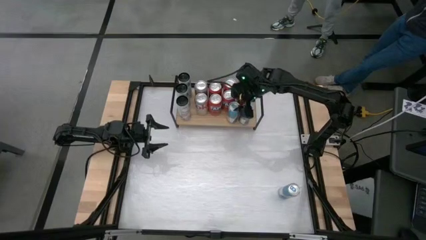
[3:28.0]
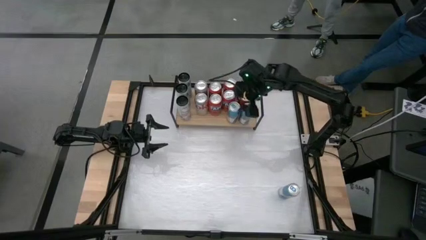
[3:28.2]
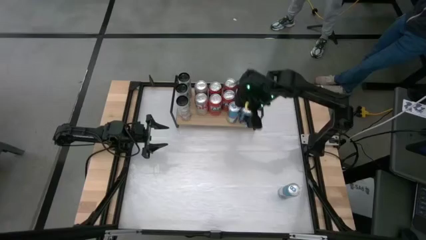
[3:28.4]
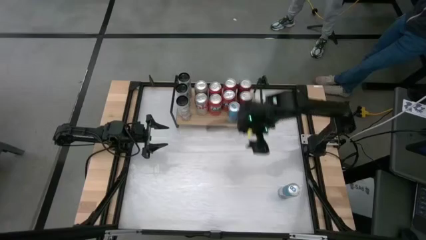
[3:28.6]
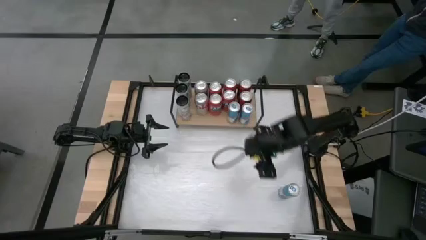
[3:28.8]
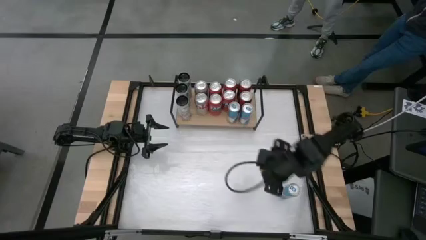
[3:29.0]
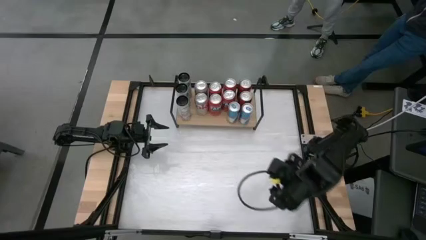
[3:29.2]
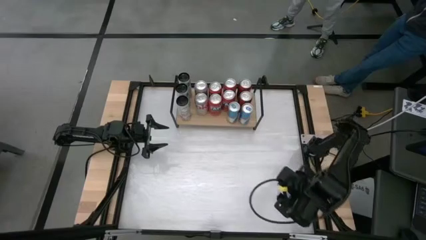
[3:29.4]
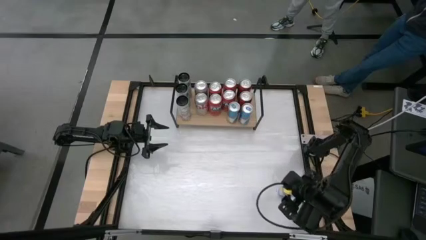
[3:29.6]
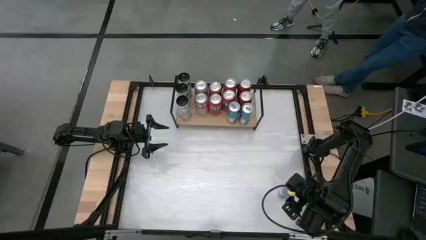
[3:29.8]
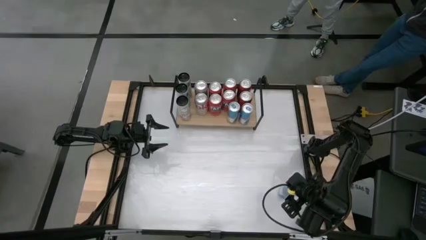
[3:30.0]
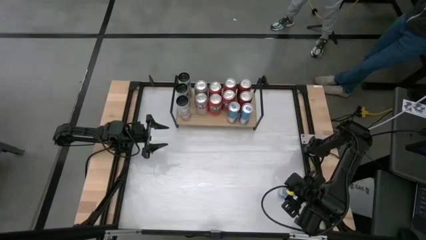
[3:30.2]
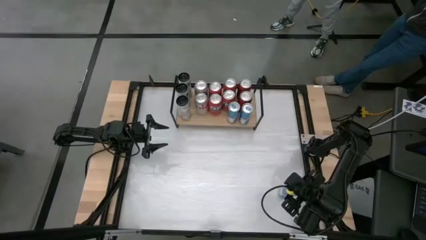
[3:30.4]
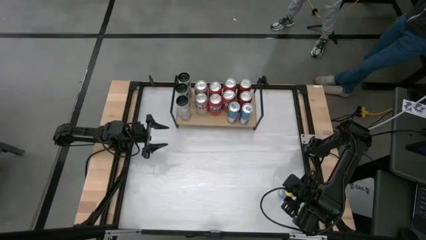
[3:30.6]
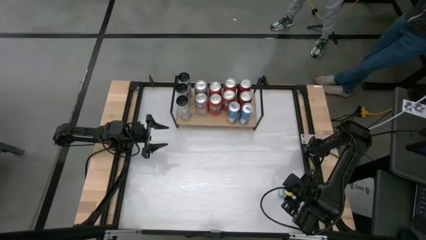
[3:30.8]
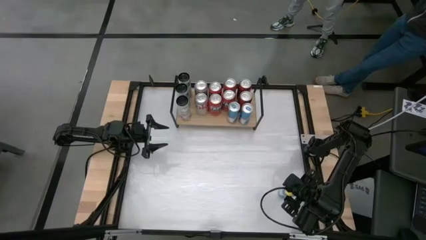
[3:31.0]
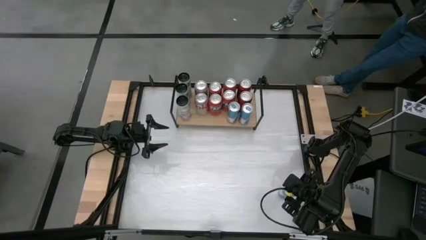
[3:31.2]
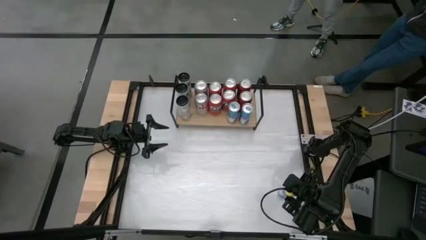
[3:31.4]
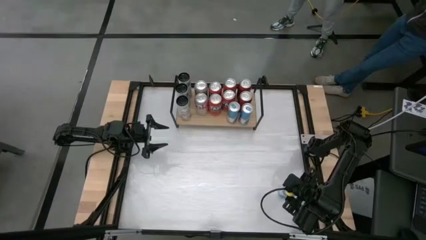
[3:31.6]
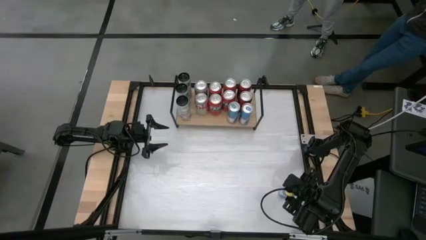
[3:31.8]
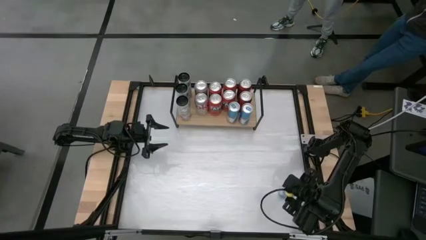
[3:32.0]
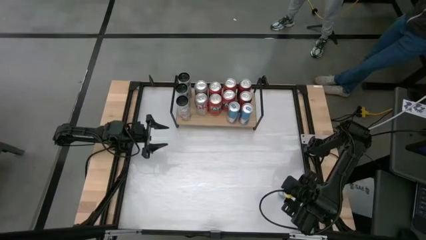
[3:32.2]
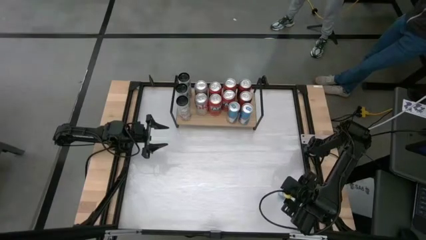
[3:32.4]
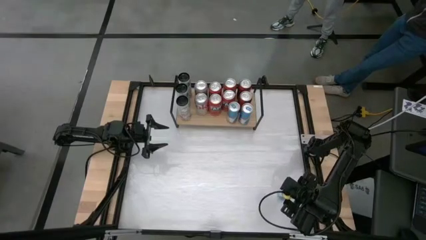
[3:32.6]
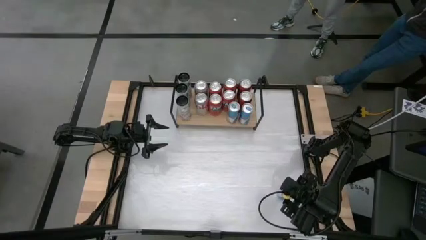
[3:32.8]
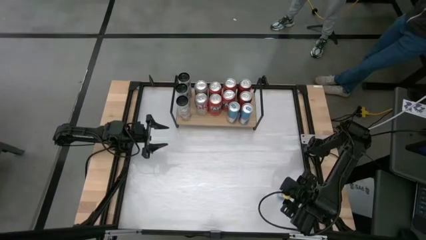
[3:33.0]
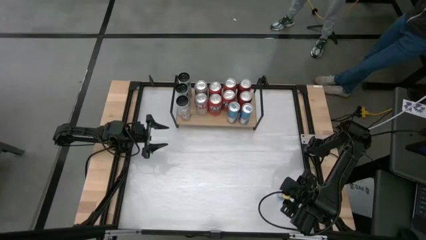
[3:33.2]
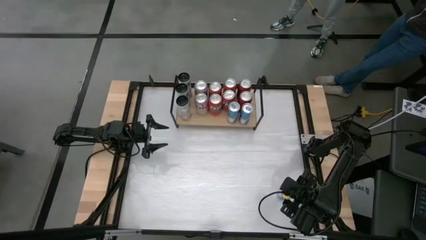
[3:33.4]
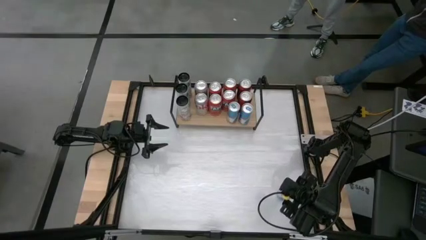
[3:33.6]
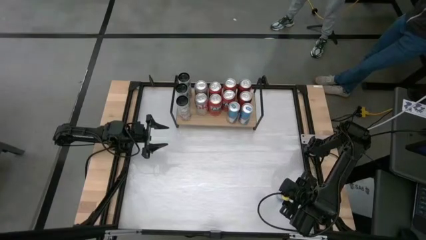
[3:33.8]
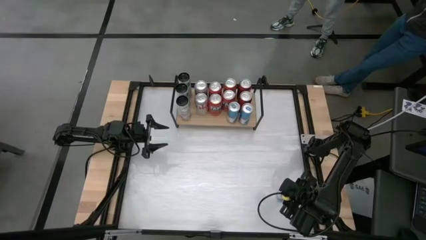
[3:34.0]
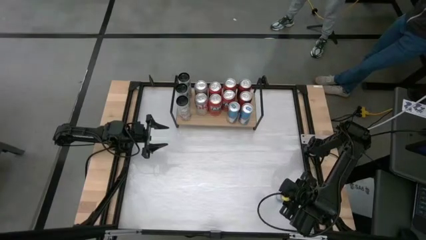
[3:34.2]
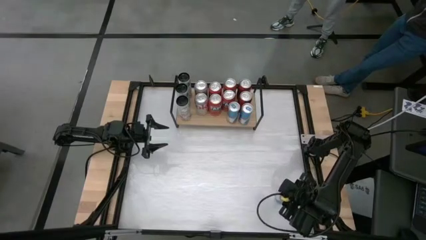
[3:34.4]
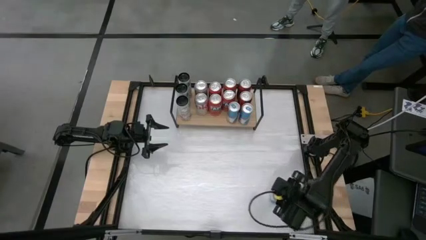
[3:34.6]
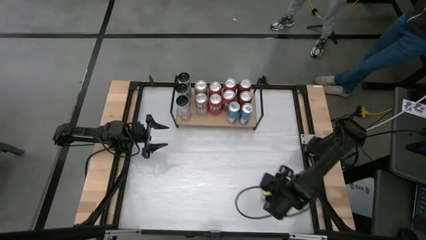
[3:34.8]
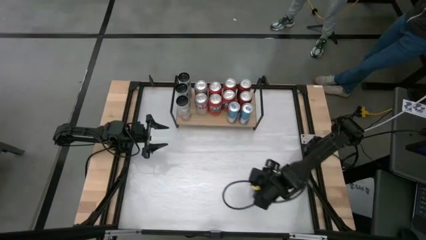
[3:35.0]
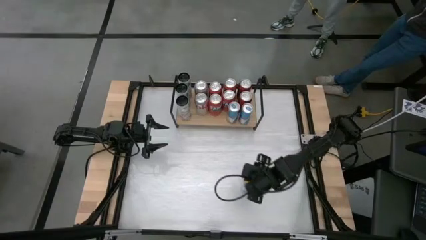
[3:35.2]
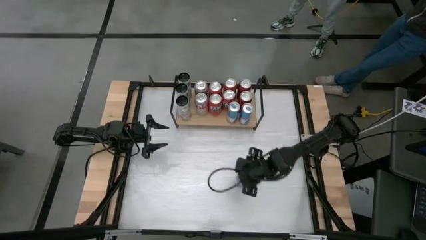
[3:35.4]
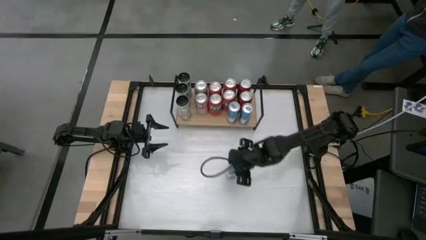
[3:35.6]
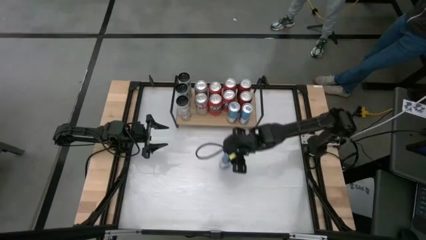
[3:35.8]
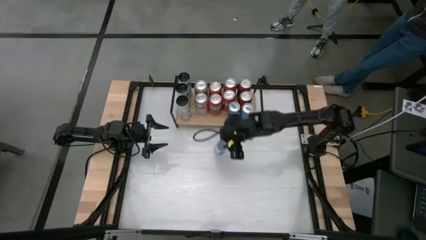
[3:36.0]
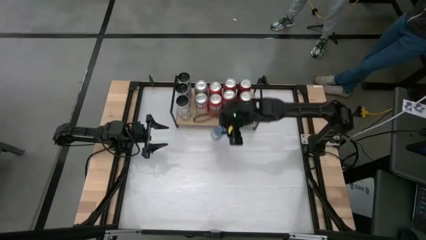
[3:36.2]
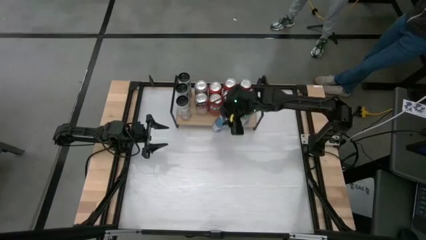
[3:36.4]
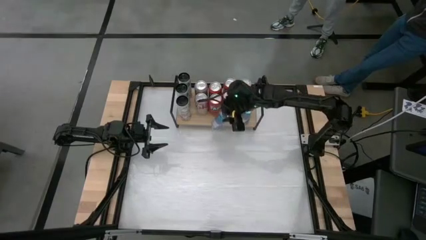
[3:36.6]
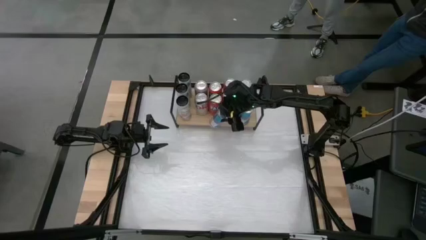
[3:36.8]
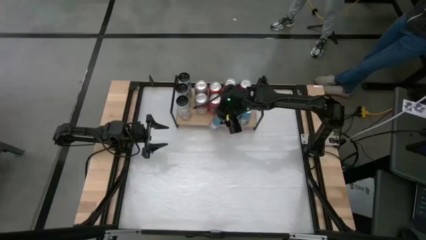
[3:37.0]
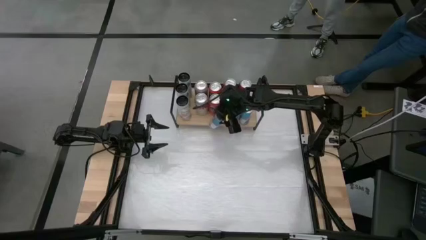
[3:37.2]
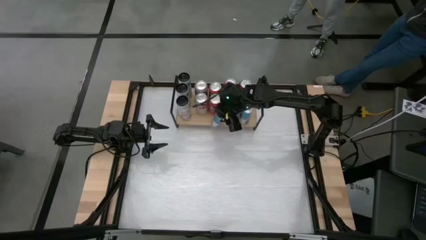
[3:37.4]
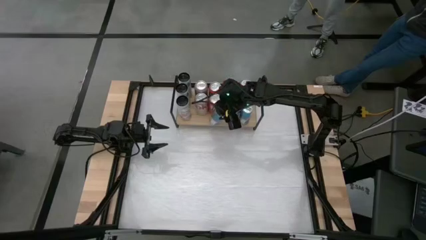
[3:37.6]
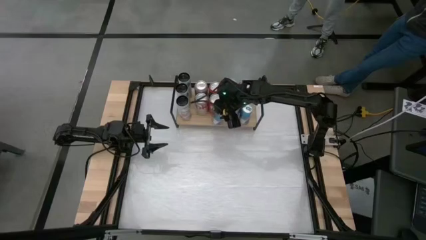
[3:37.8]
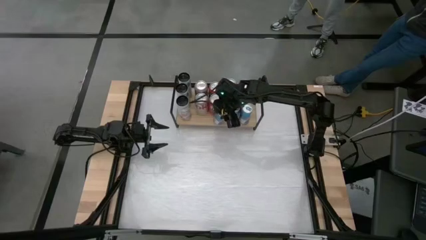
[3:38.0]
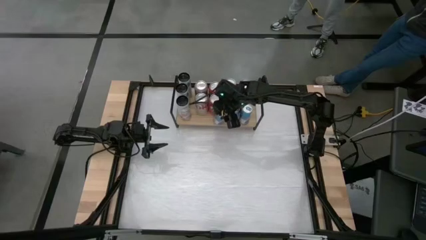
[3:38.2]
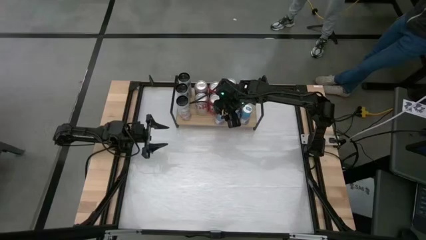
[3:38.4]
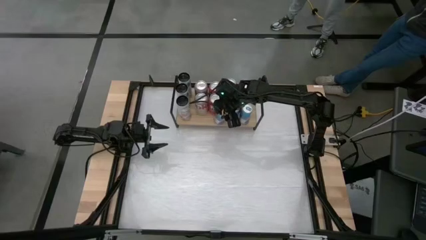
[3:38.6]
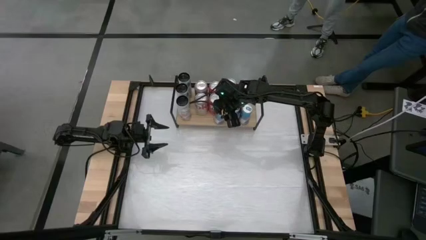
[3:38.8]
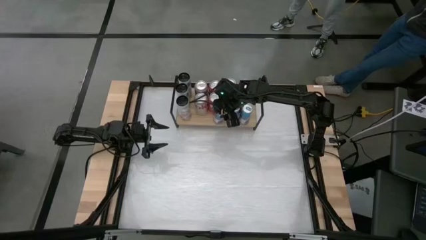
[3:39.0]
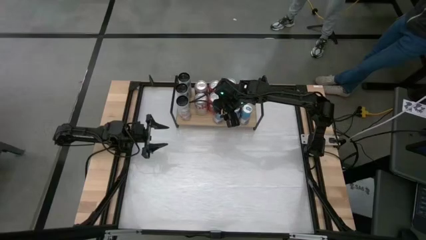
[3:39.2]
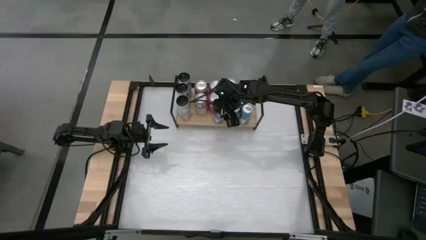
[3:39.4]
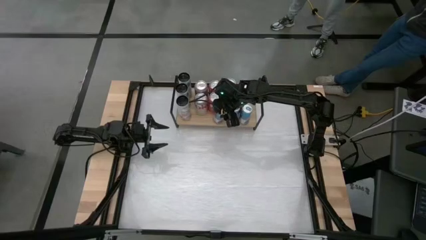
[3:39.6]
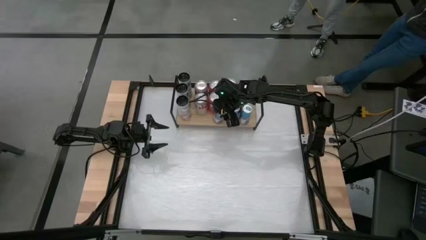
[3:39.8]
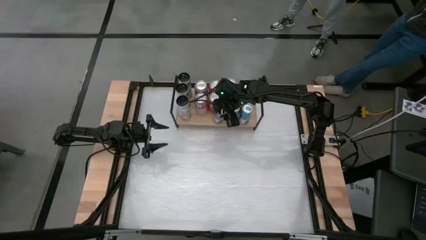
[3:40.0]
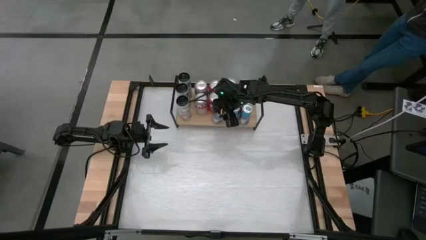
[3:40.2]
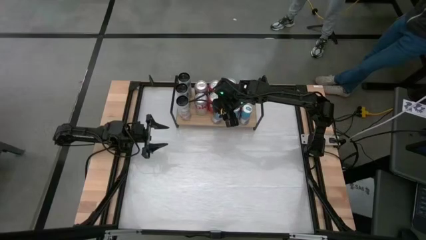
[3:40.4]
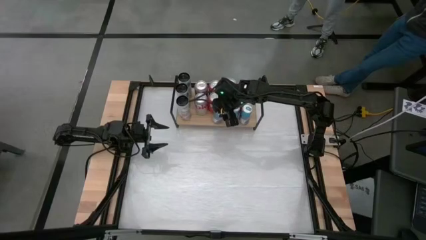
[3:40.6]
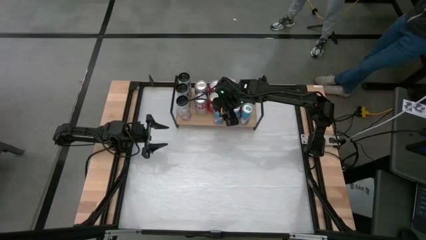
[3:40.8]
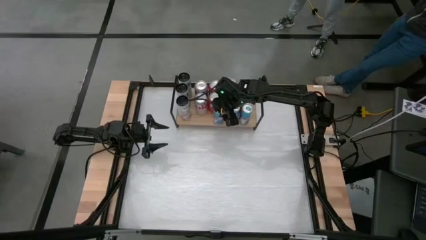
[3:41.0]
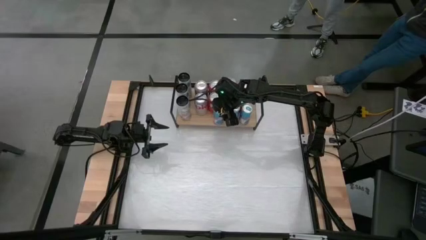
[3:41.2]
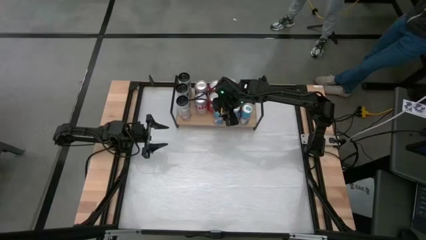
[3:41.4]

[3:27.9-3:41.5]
Task: Place canned beverage on shelf
Put the white and blue soda can on the shelf aligned with other pink soda can
